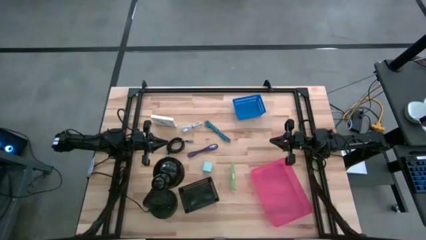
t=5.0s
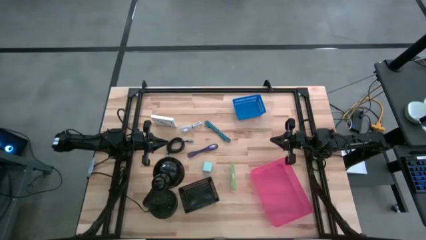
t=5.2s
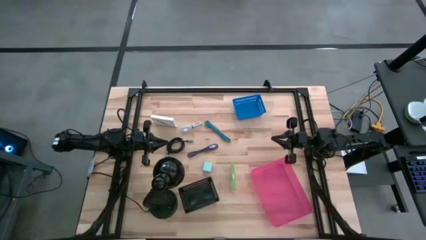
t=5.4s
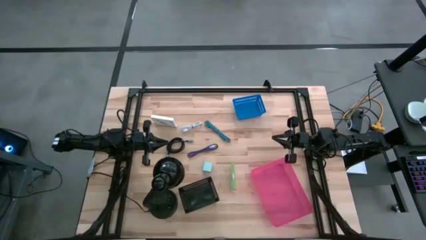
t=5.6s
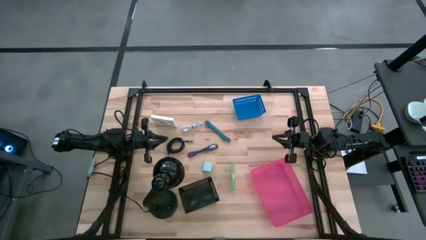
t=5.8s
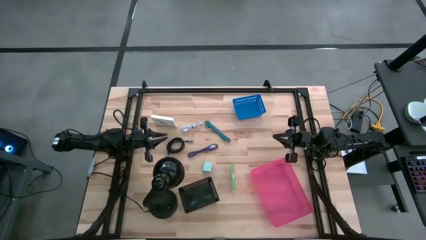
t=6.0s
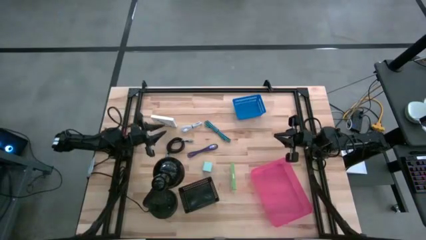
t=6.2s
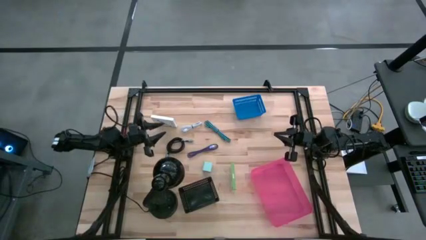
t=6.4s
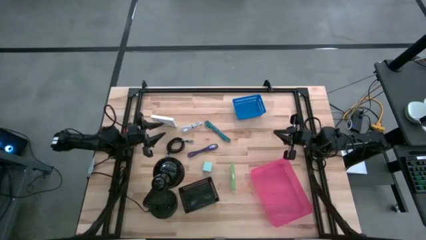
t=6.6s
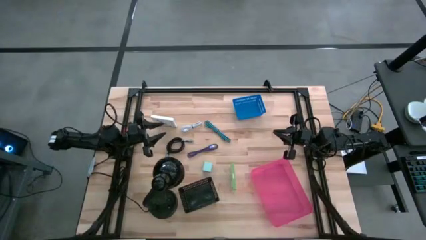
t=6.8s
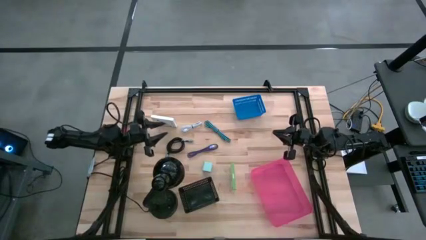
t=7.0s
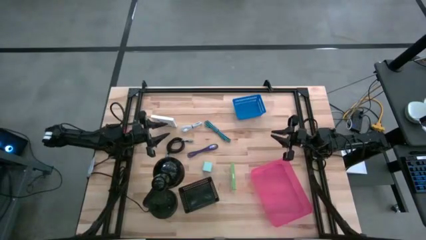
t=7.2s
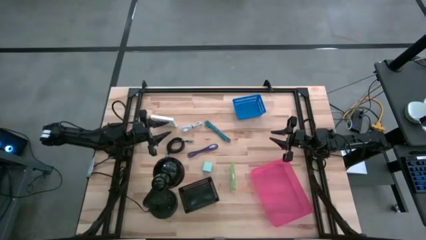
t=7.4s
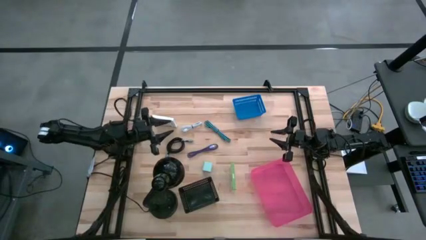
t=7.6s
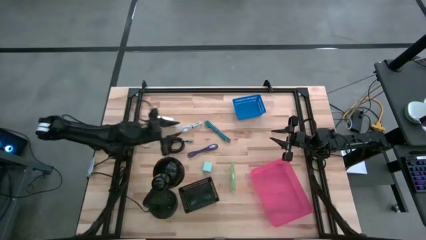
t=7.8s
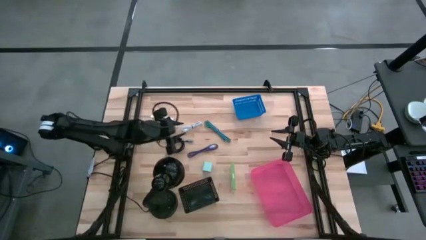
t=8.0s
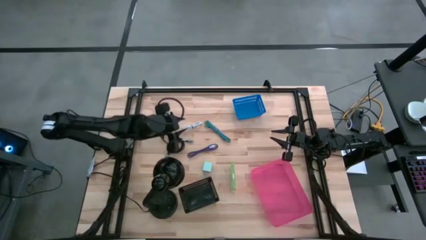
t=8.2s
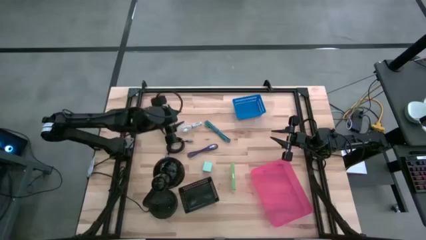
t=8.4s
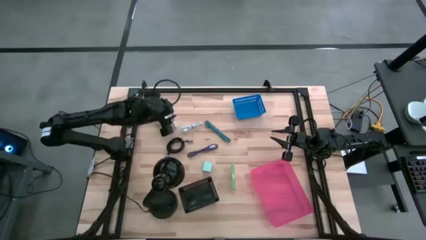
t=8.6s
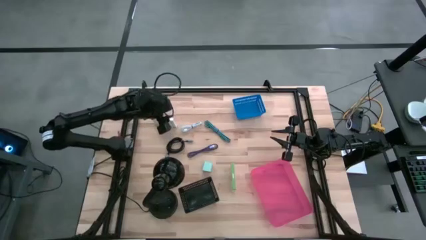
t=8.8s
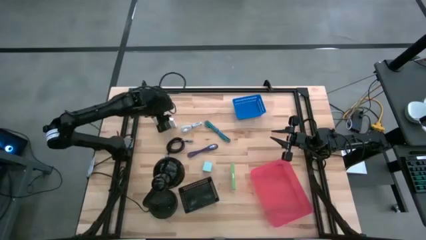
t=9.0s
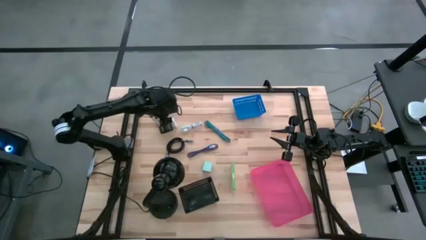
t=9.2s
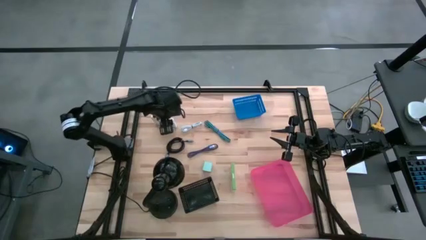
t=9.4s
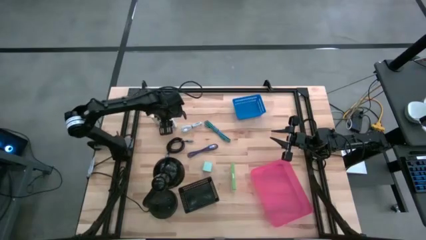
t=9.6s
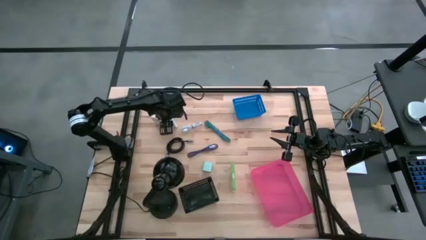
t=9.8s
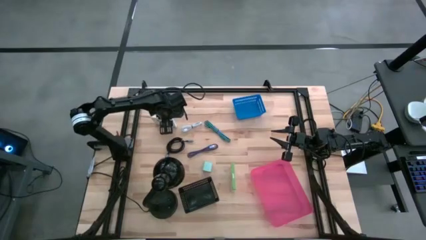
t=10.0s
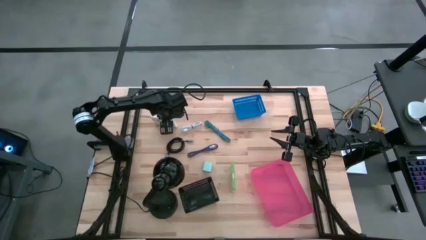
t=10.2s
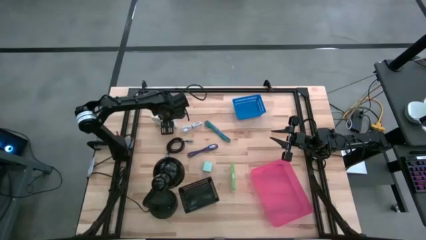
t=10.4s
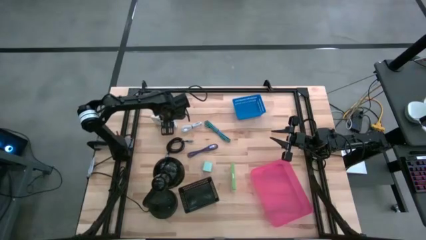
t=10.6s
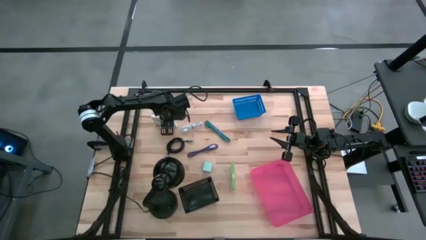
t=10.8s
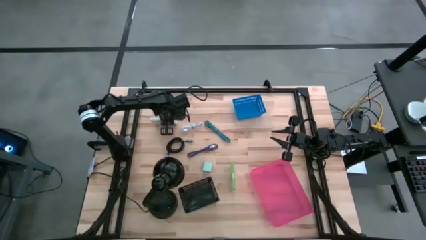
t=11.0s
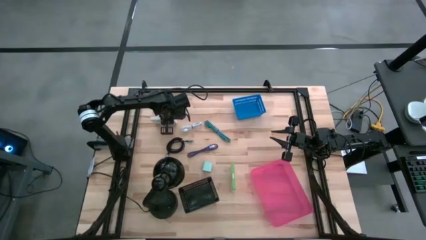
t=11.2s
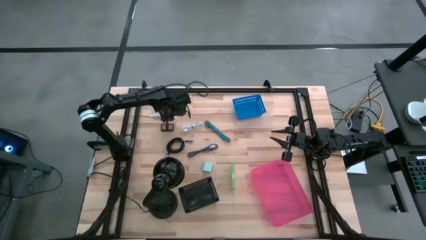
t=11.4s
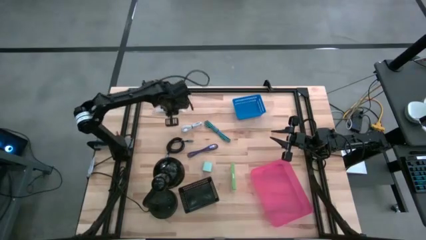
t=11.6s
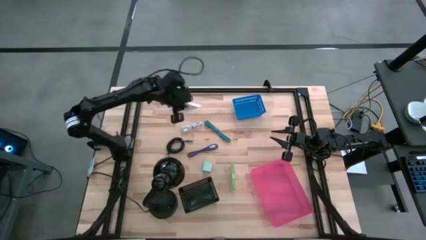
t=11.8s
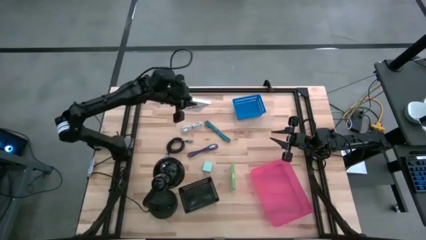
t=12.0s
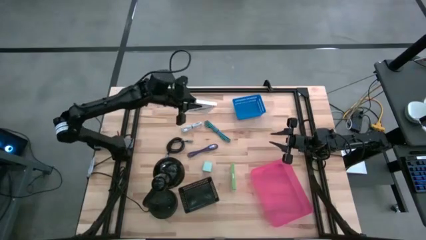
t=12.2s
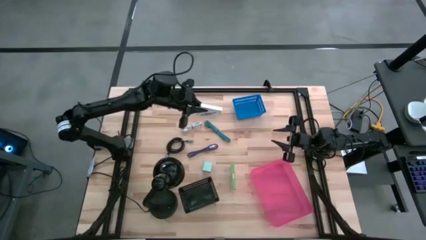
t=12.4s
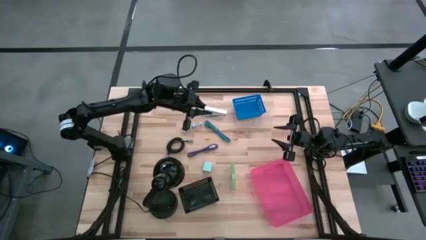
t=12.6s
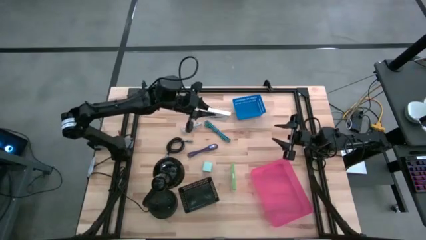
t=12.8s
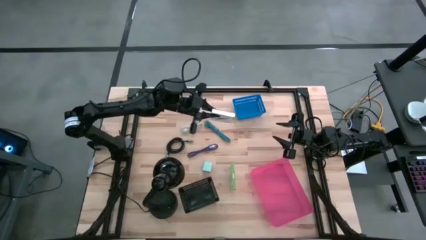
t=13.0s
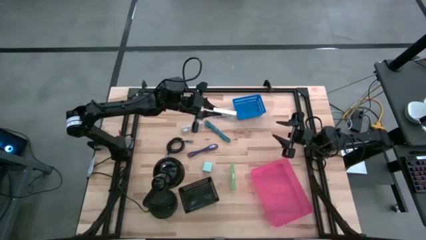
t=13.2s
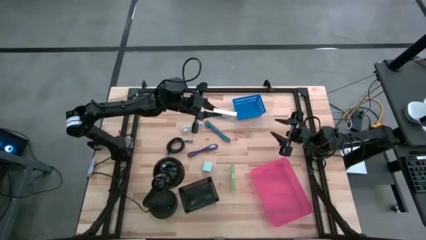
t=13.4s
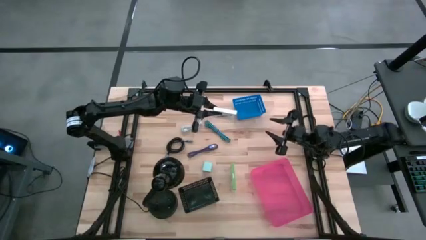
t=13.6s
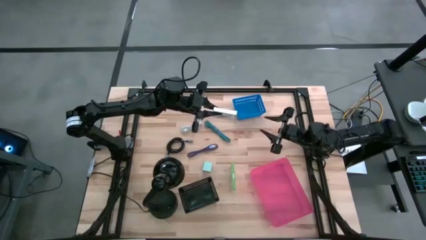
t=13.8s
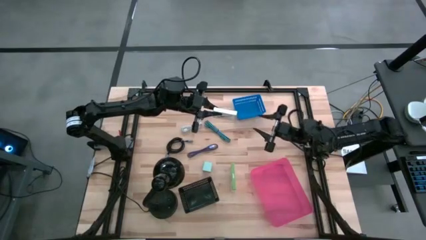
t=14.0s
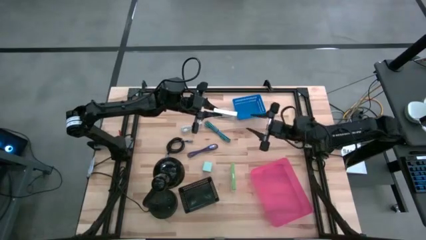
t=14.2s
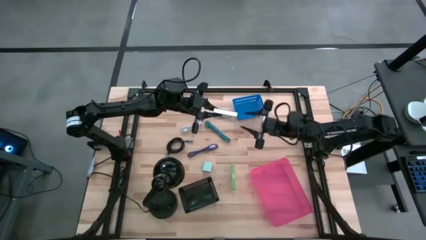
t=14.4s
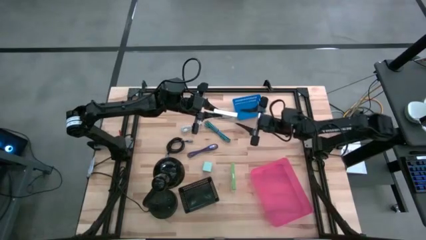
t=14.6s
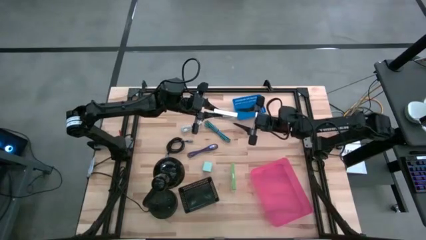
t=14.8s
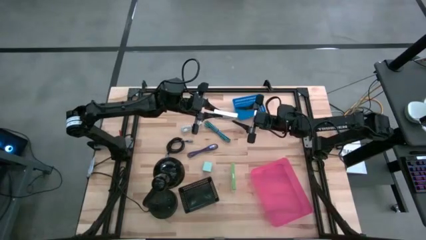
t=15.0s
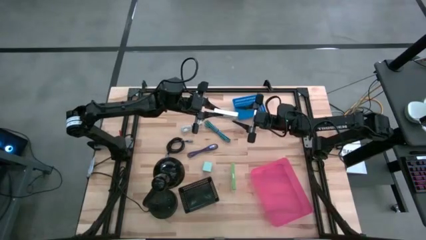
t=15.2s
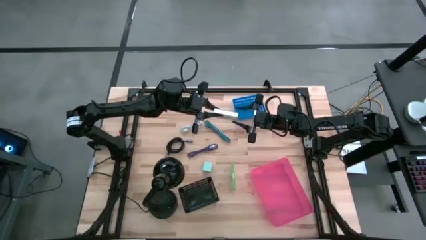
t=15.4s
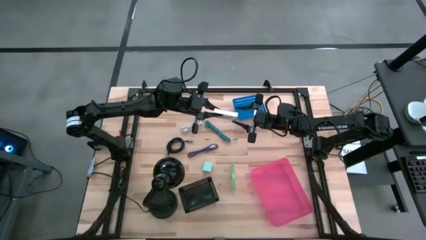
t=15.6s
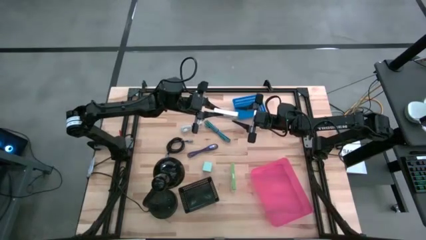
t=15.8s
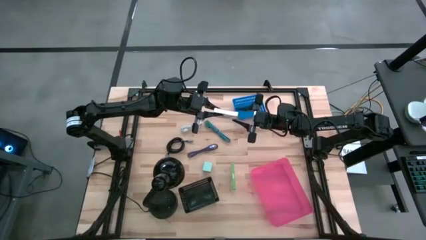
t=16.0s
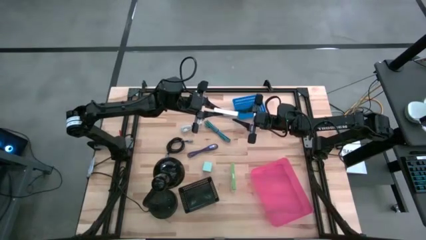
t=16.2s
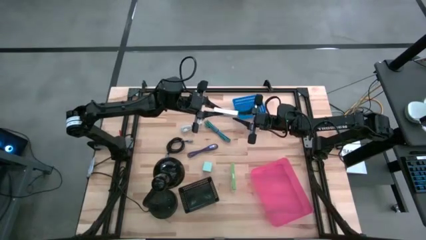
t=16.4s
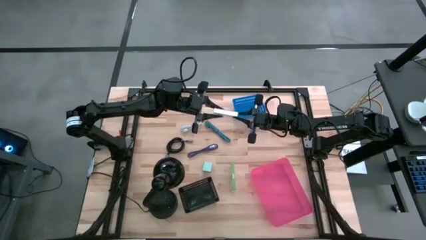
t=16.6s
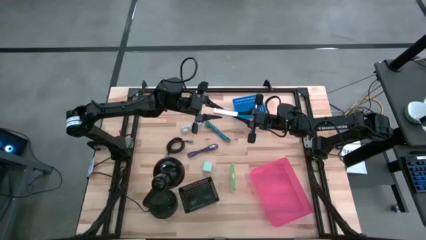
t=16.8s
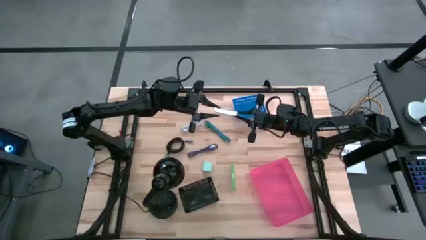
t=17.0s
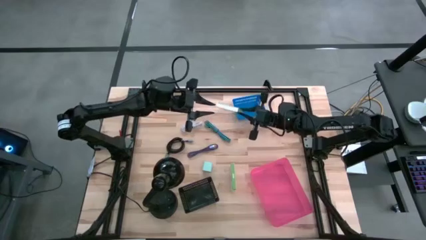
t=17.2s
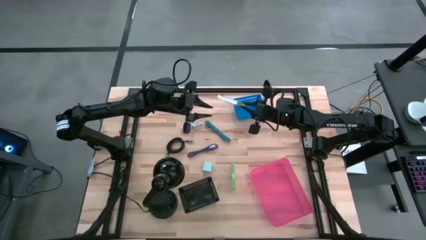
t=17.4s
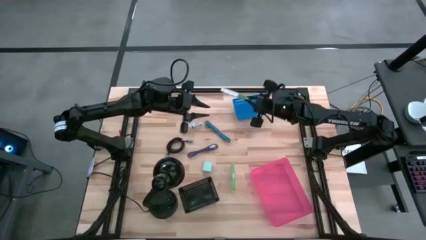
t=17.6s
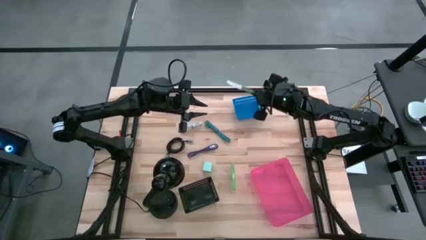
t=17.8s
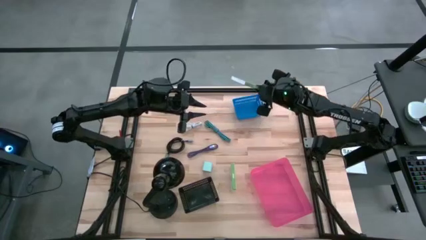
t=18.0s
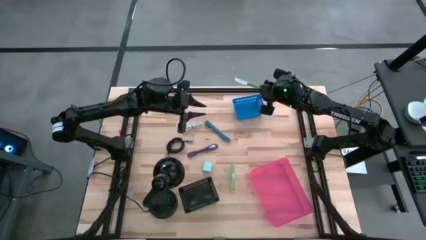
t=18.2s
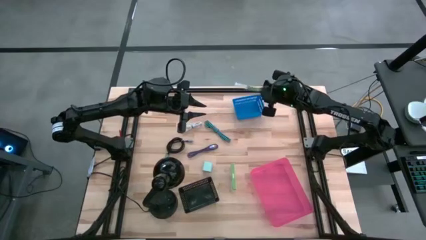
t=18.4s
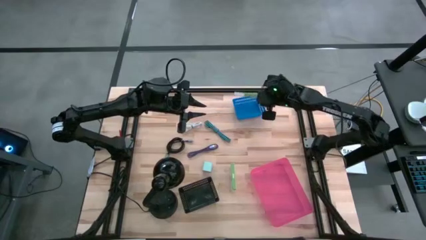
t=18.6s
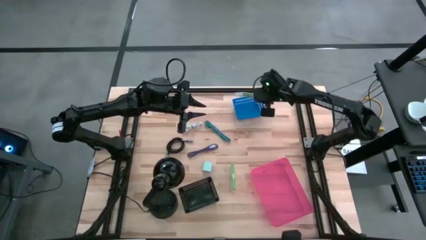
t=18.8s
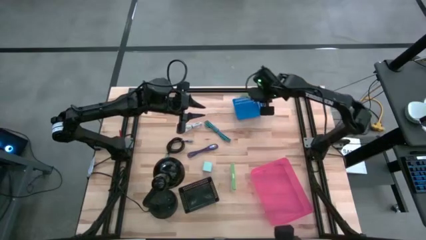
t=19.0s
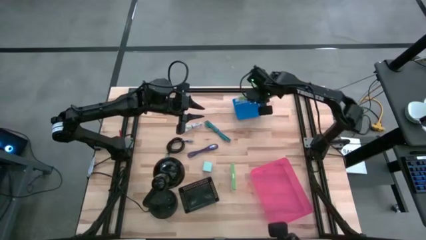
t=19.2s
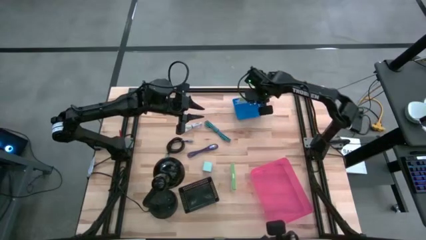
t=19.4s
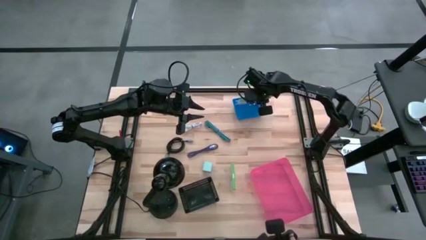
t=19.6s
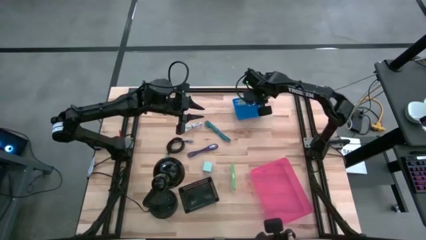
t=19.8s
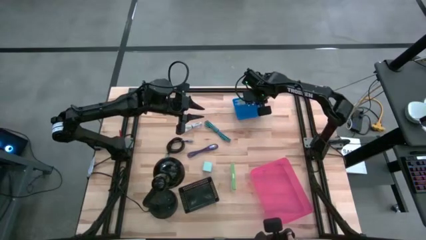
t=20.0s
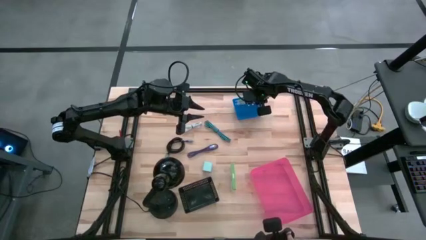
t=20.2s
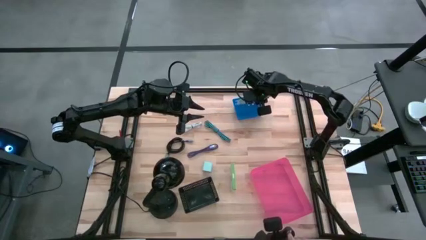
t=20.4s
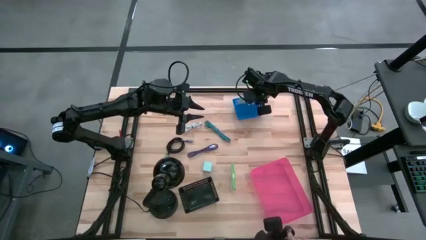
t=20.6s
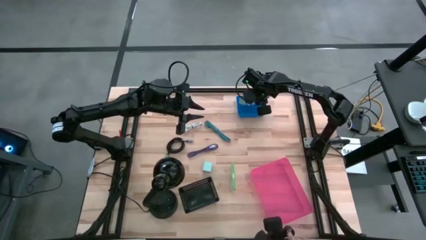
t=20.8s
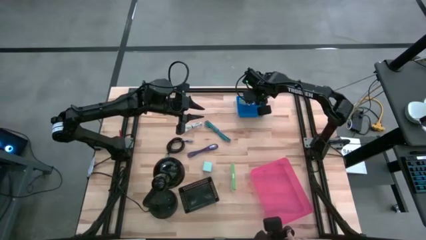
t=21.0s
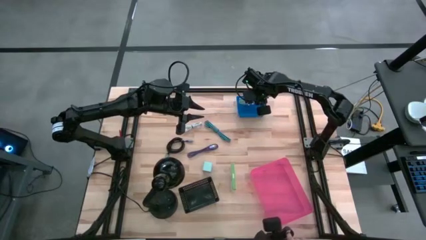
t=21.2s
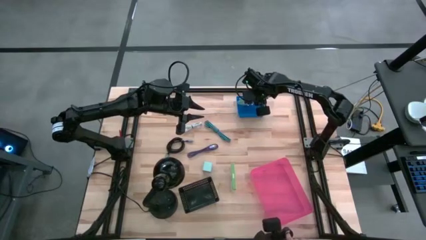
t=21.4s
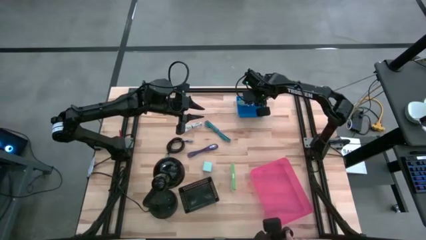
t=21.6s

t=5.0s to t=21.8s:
Task: Pick and place items into bin
Put the top white card reader box into the blue bin
